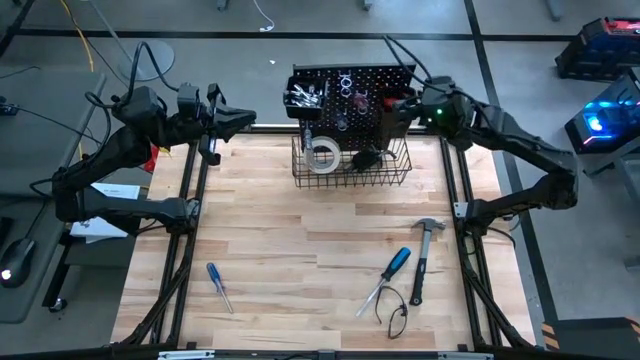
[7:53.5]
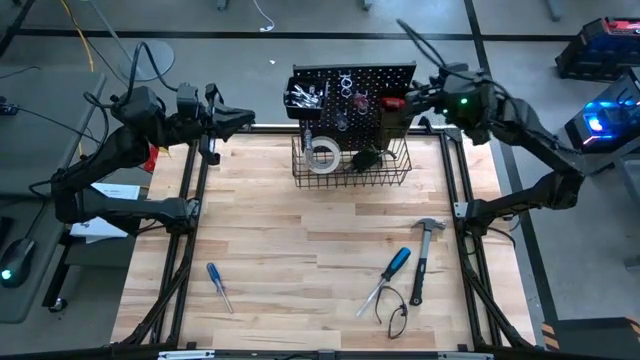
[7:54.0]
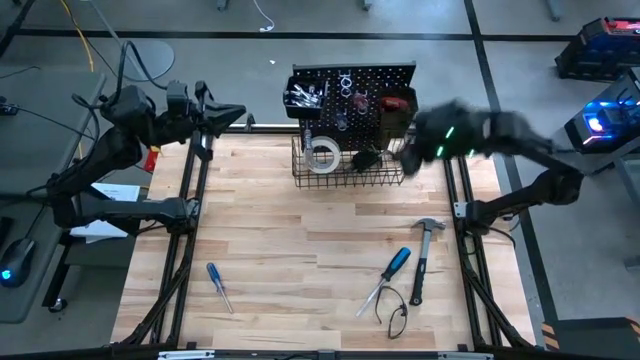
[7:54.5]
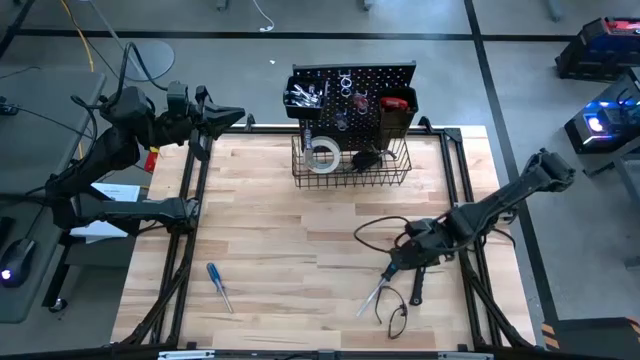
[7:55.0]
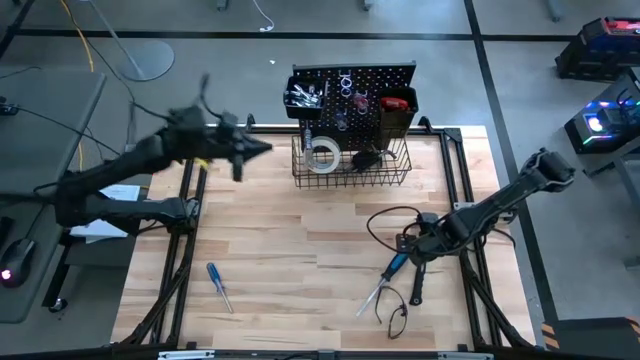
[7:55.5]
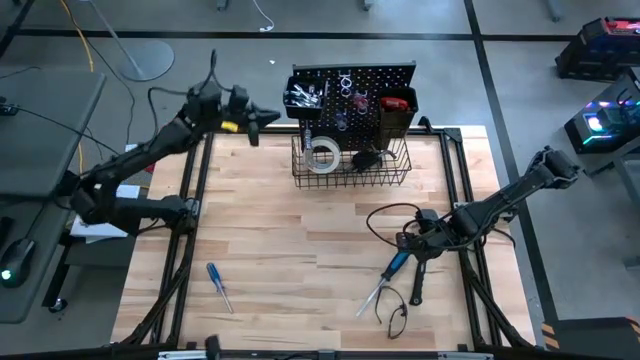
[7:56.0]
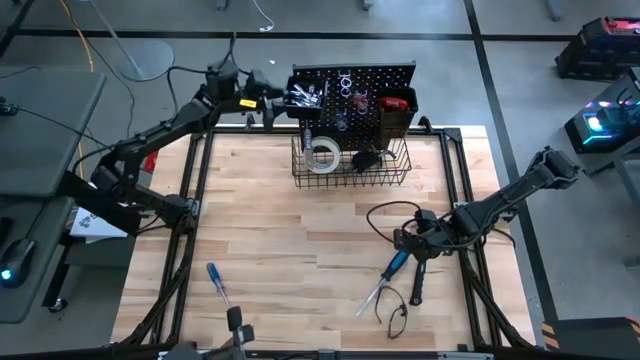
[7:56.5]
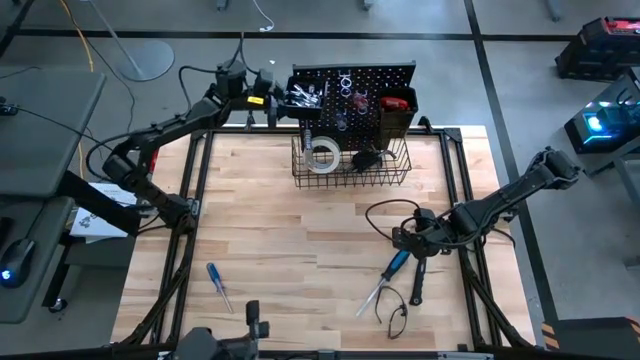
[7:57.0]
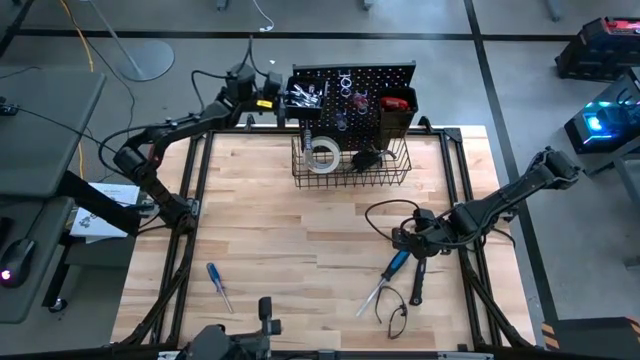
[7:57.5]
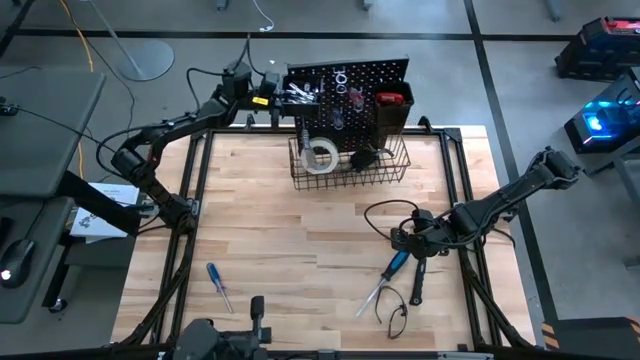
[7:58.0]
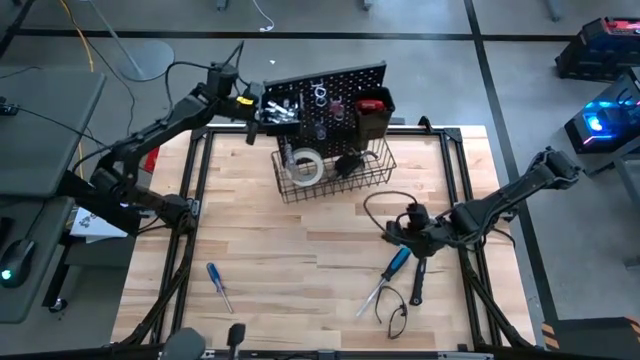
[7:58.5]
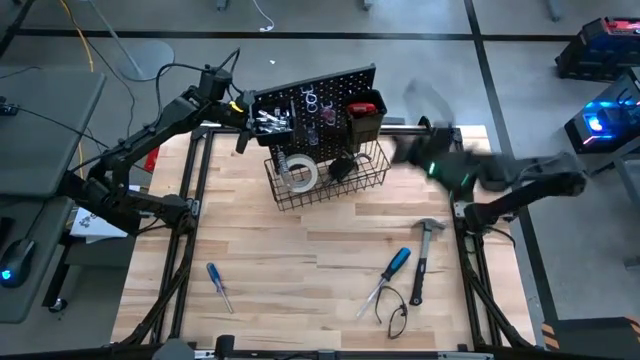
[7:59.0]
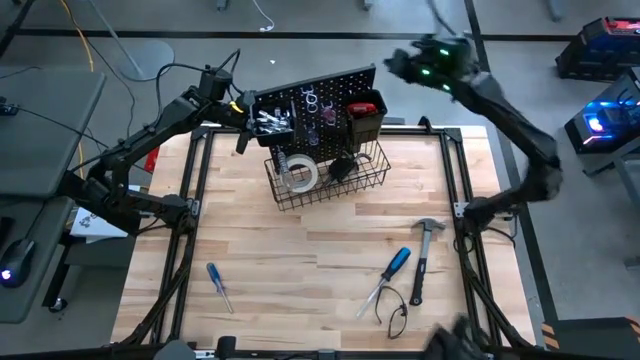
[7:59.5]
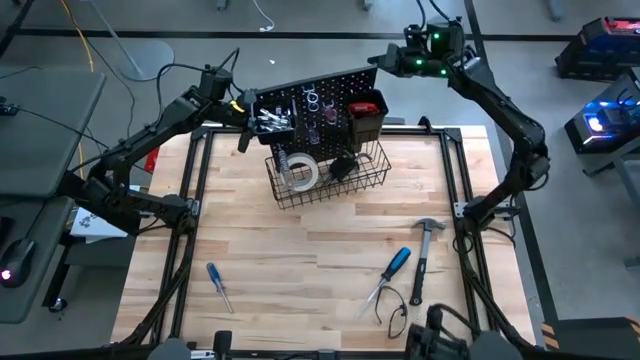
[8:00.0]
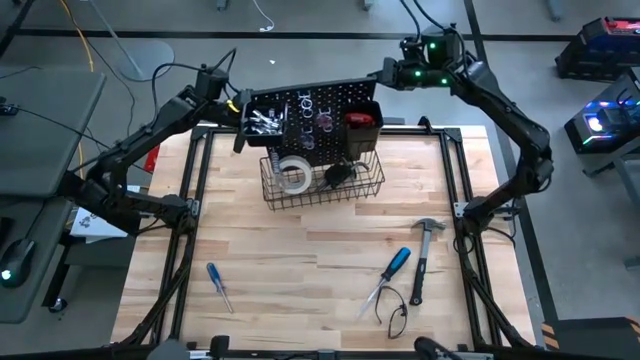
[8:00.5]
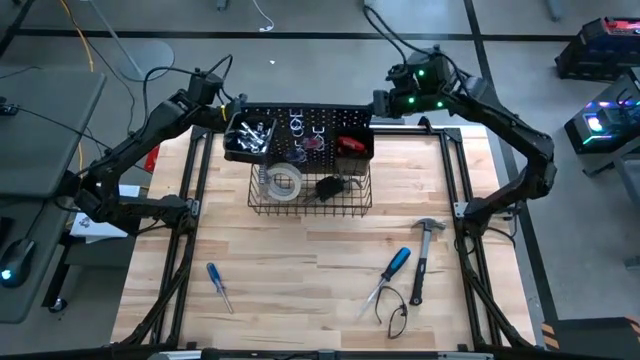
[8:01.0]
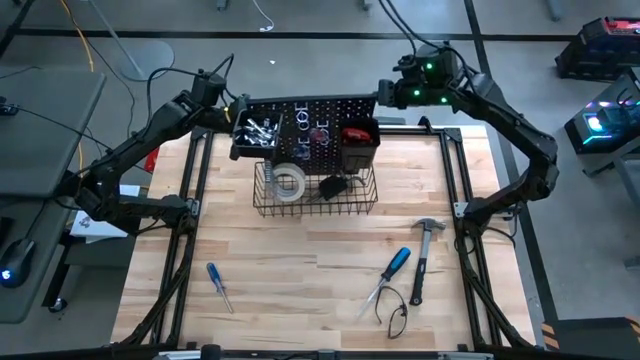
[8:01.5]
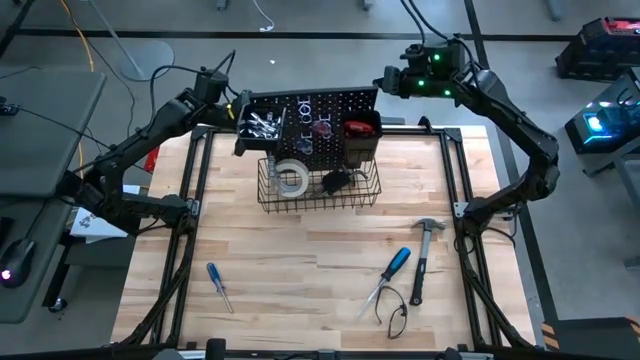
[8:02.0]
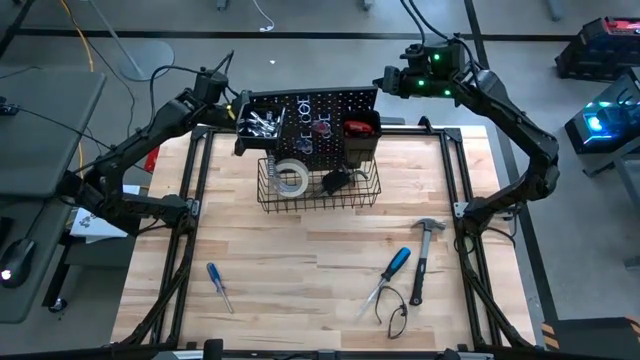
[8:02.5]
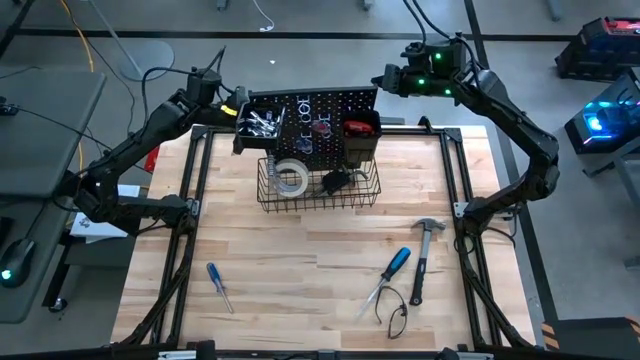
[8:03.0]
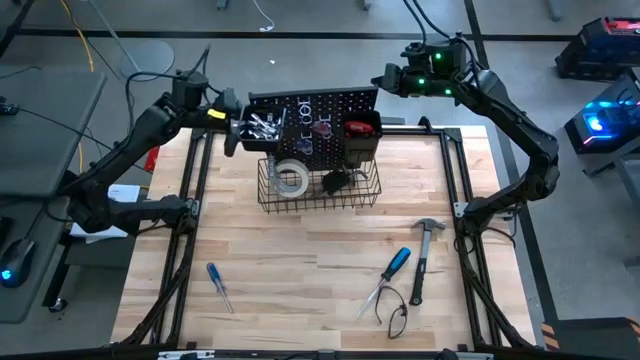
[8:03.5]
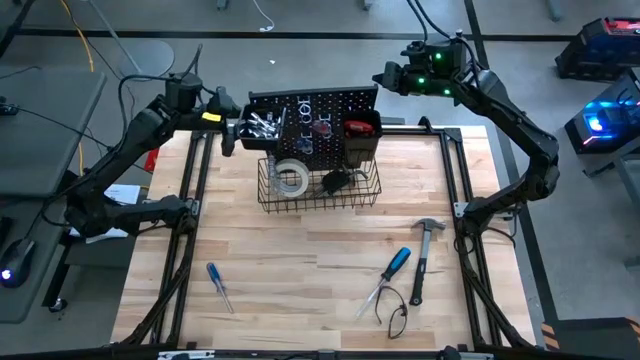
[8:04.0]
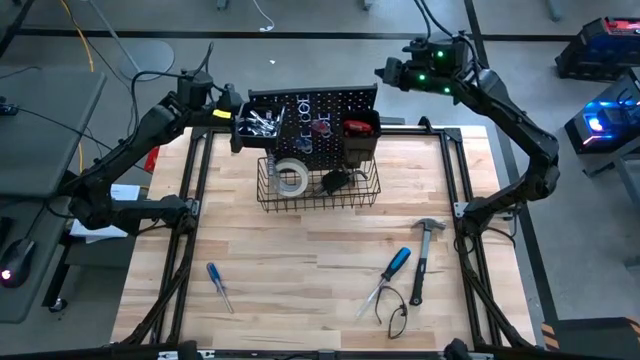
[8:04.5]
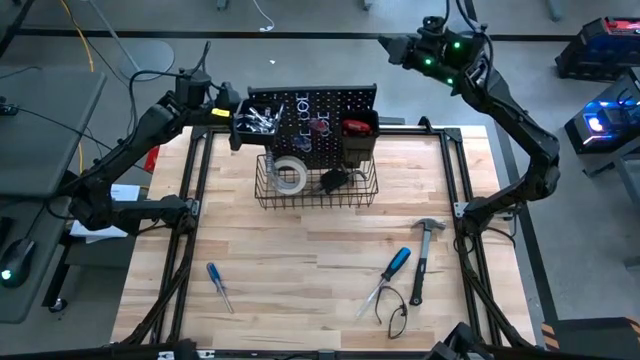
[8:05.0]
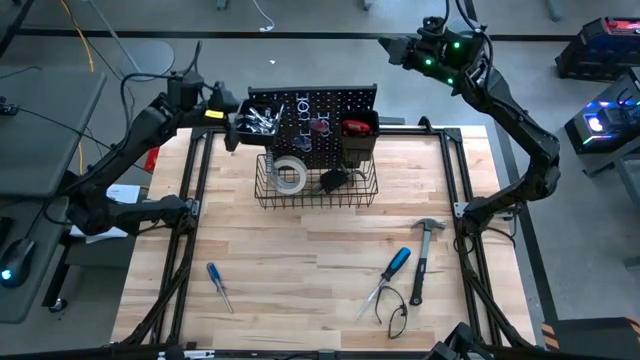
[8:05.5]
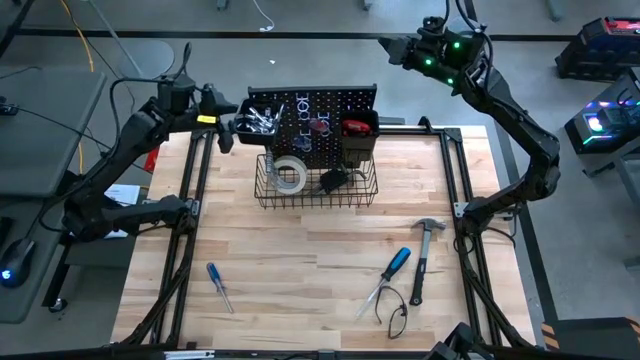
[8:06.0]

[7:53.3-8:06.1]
Task: Hang tools onto peg board
Adjust the pegboard

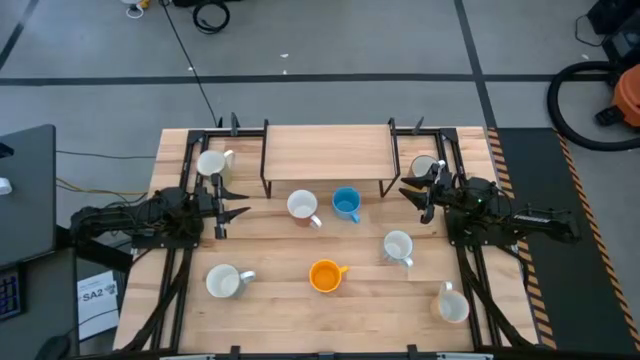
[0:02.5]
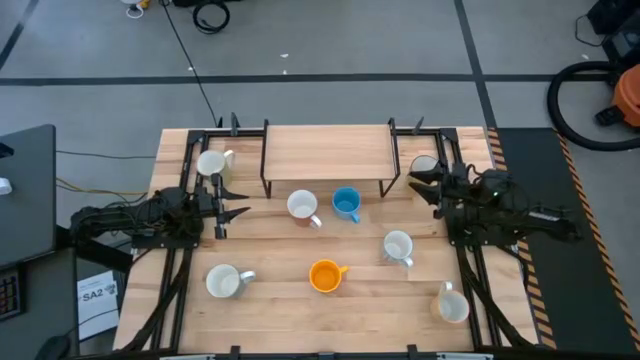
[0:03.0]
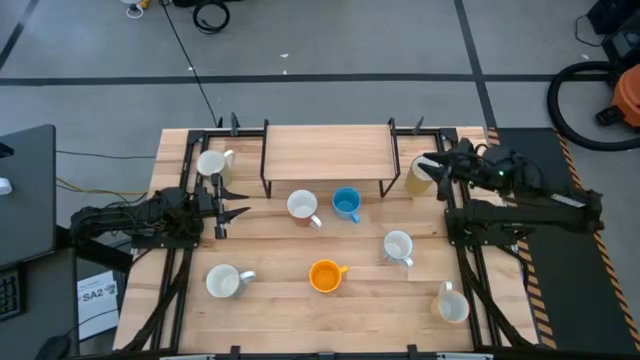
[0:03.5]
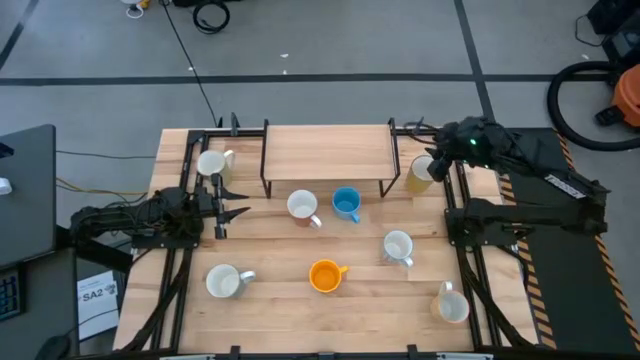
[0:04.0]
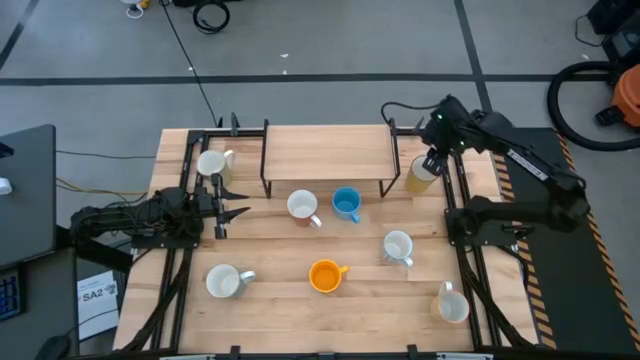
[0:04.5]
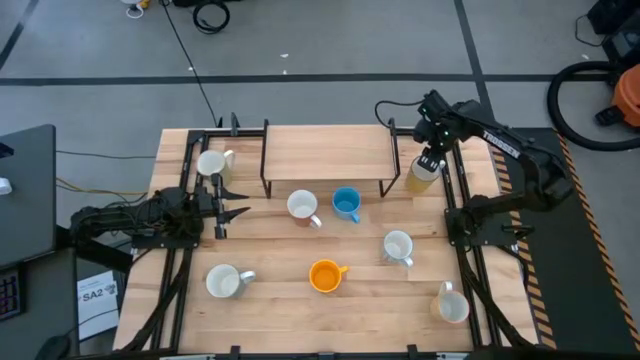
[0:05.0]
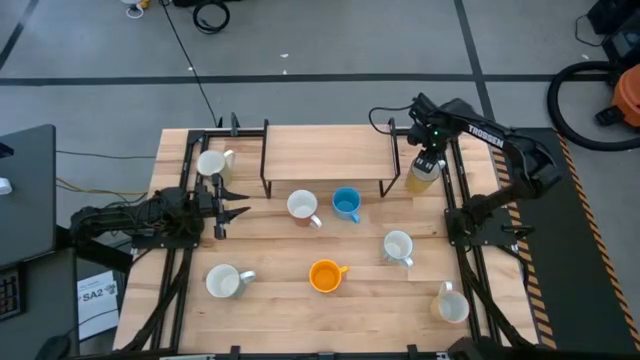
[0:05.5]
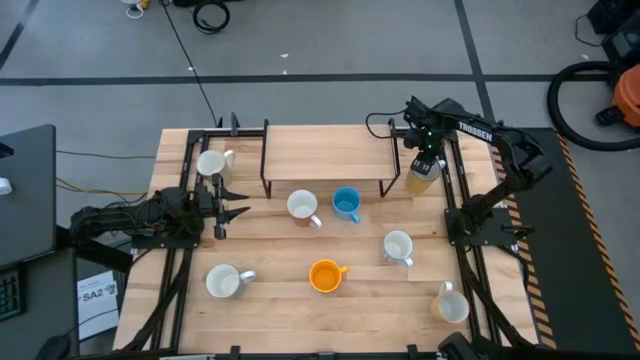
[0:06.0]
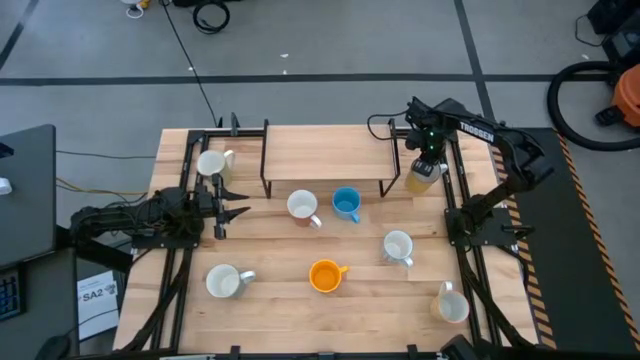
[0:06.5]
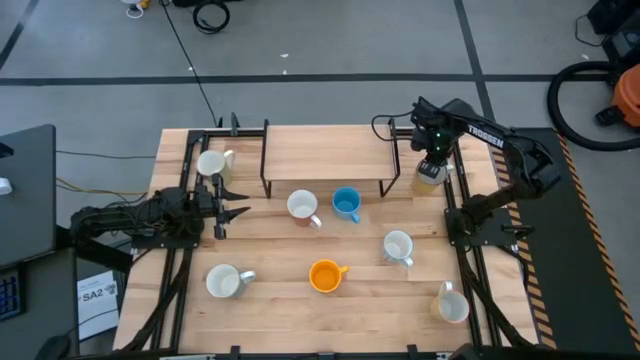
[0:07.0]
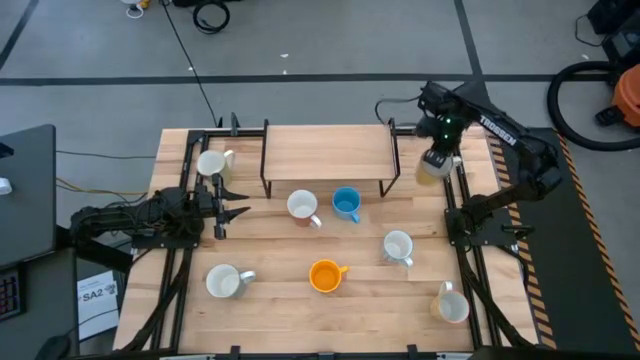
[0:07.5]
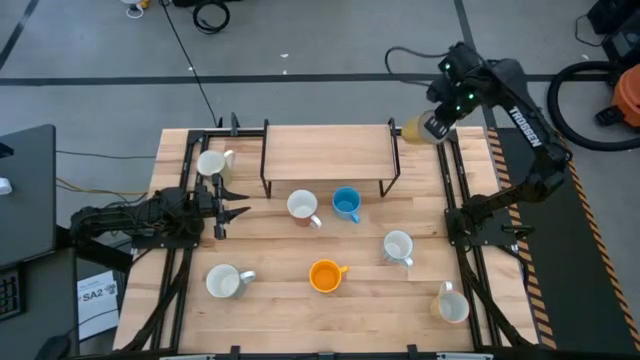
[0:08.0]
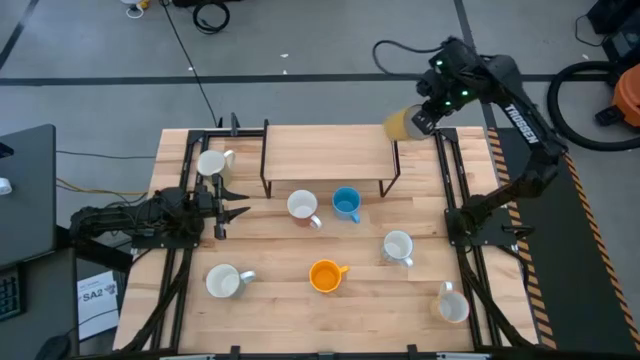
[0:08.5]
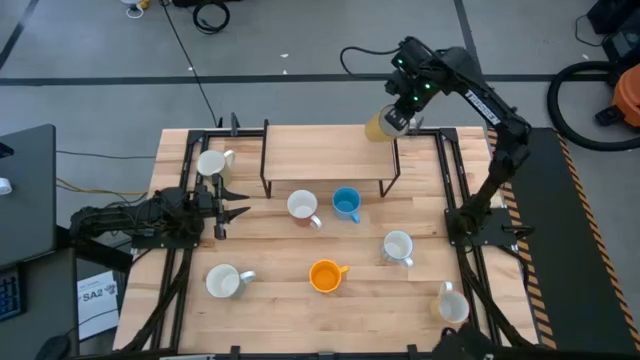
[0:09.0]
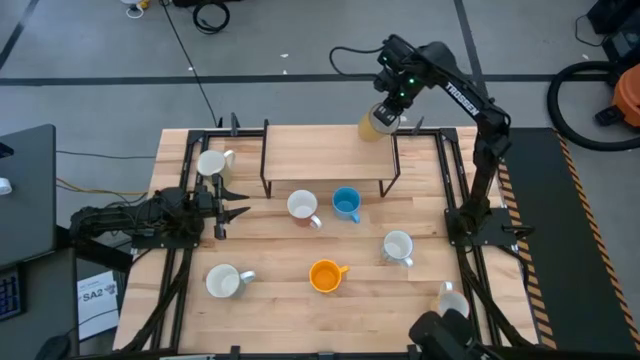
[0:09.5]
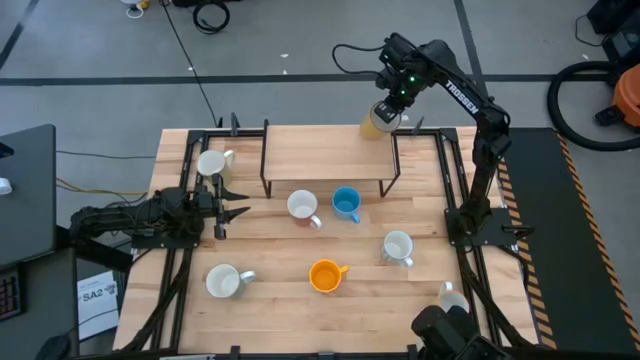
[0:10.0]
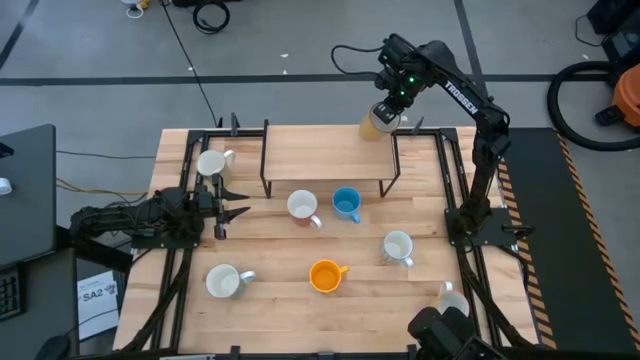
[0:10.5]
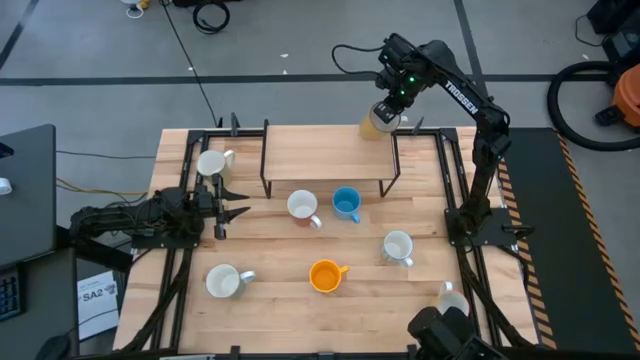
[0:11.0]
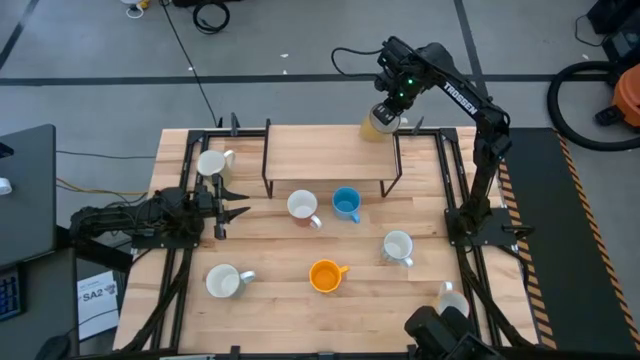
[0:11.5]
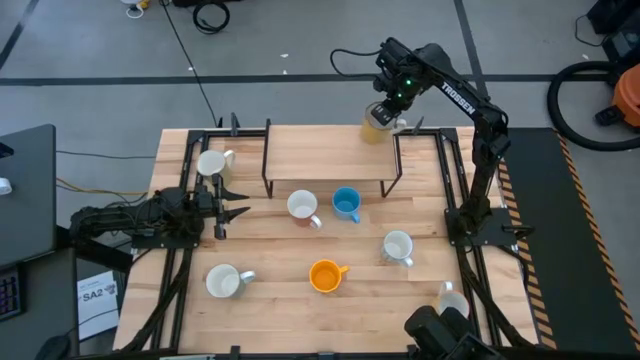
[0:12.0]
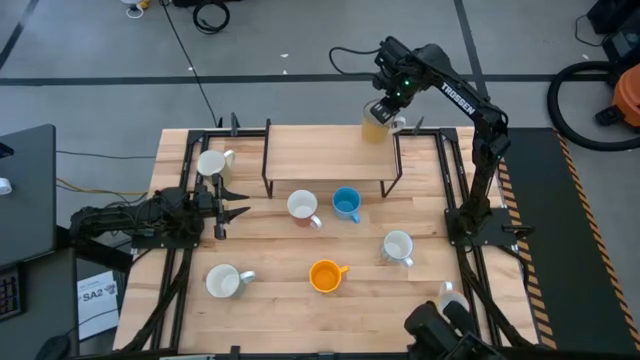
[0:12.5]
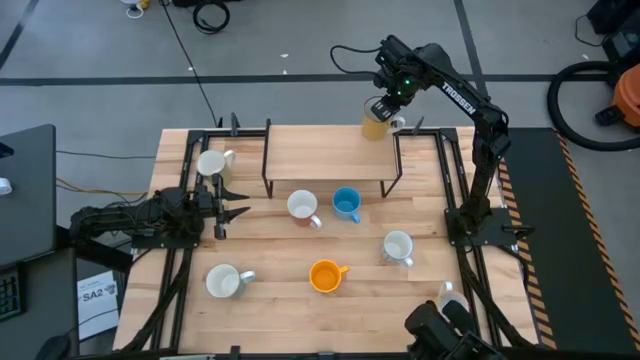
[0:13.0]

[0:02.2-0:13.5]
Task: Place coffee mugs
Put the light yellow mug on the shelf
